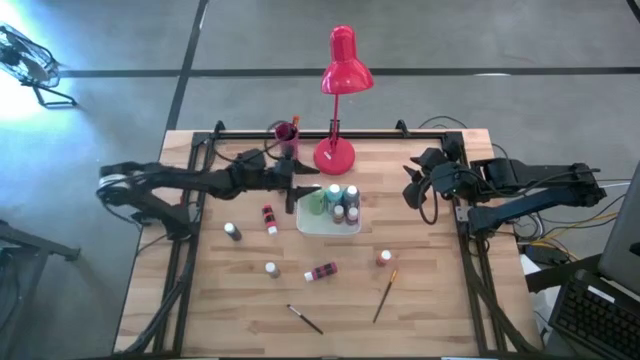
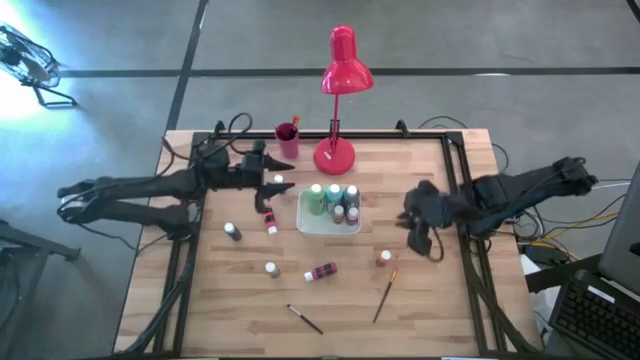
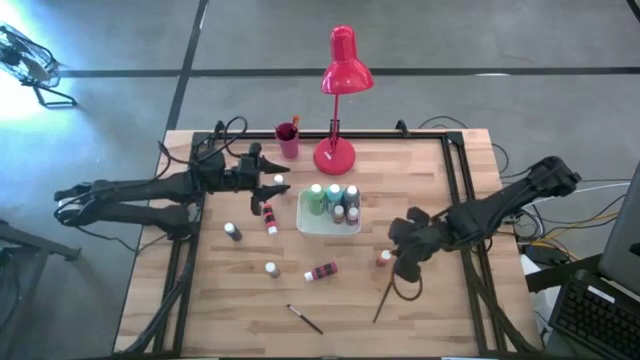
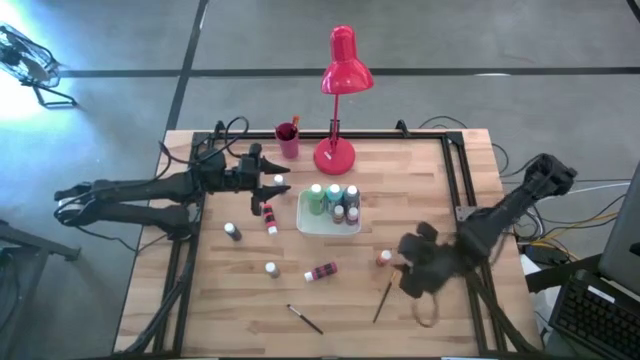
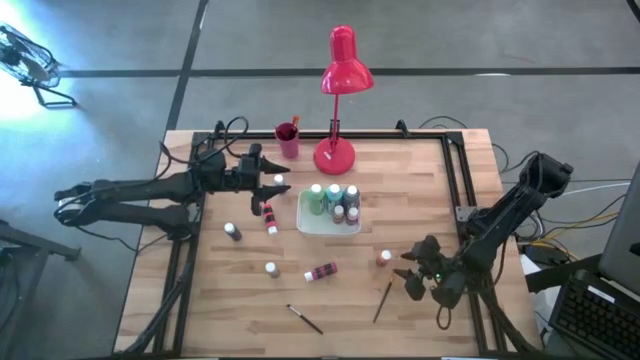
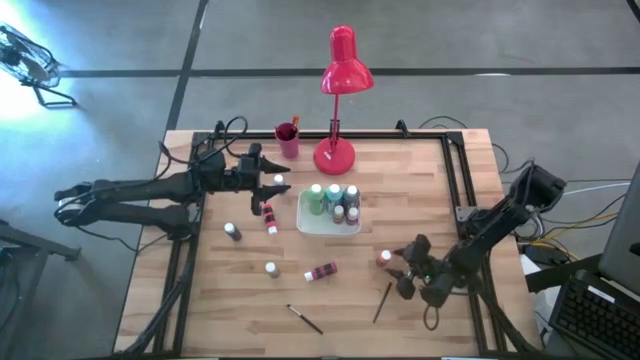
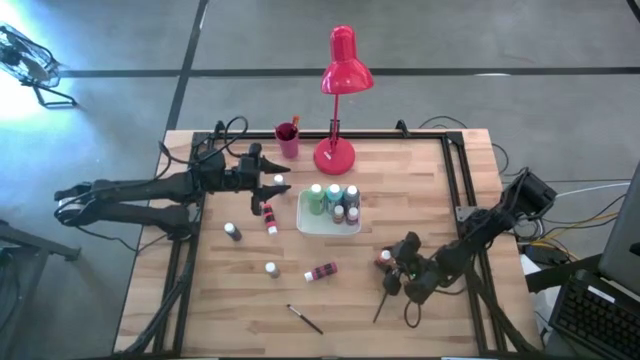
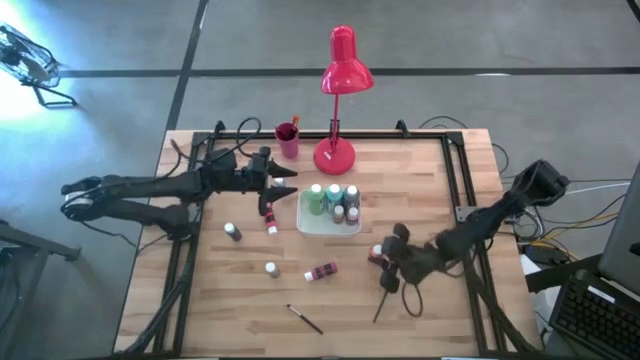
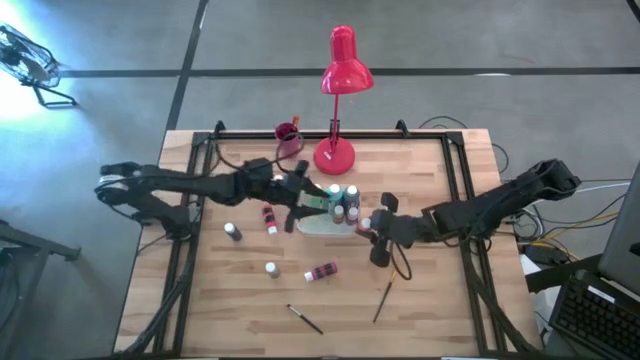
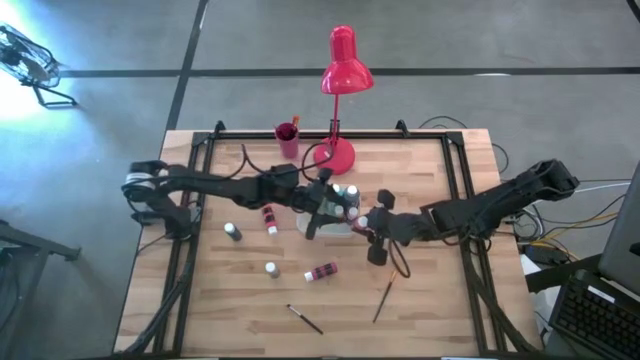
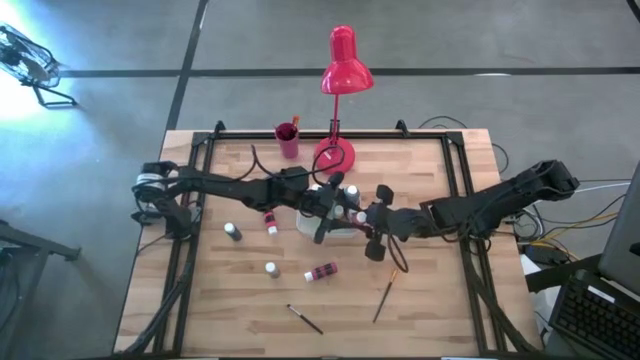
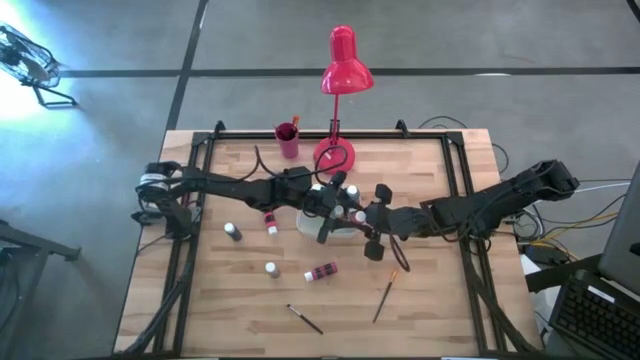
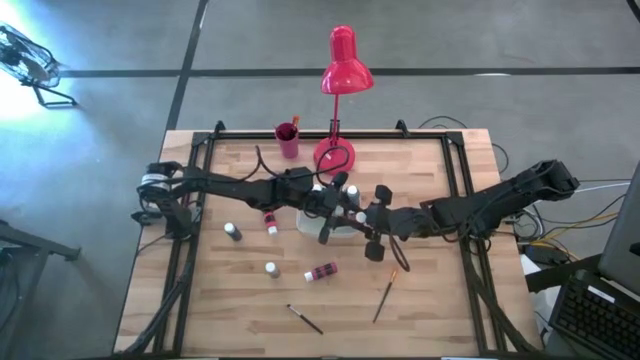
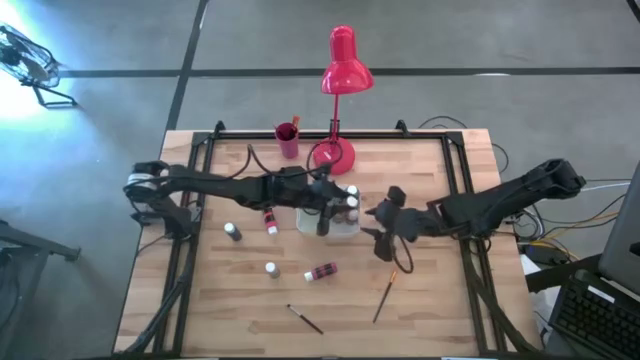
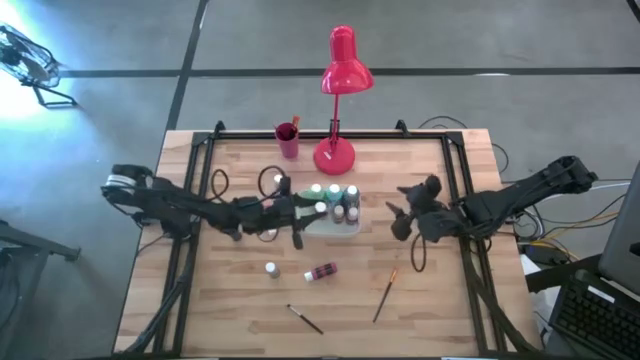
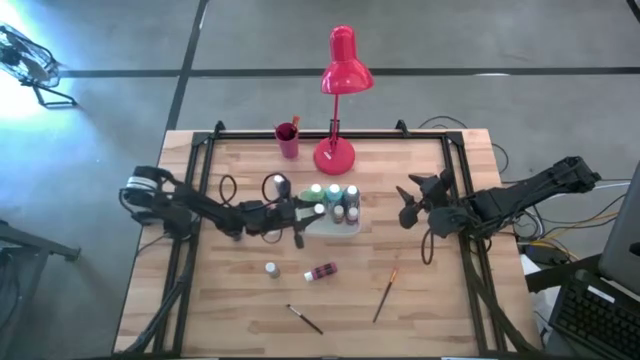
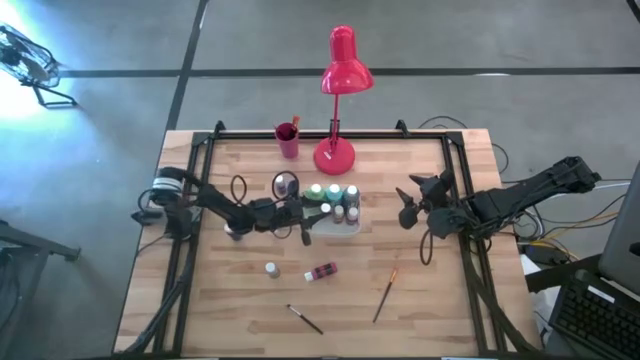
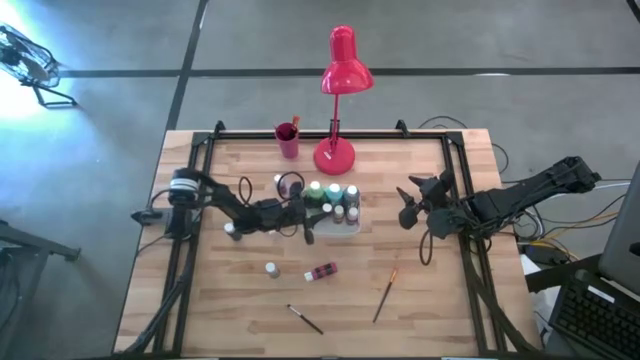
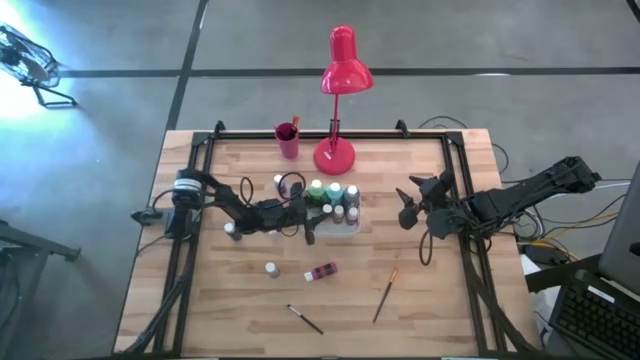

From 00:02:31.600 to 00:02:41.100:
Task: Pick & Place Paint Supplies
Put the orange paint bottle into the white bin

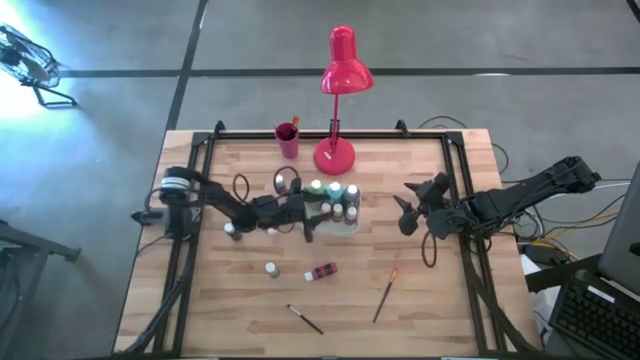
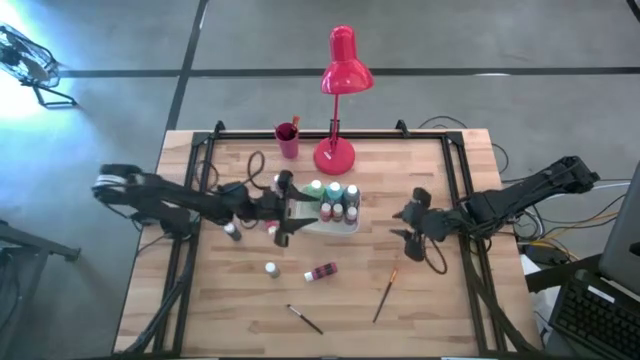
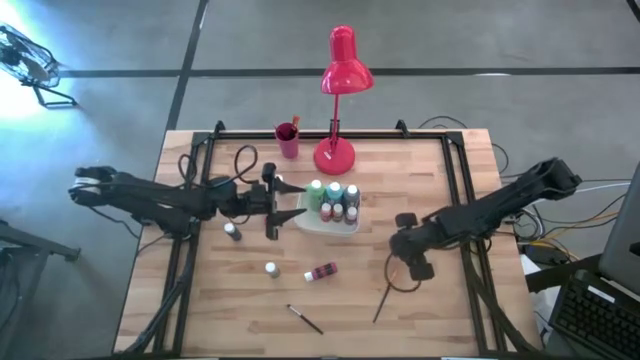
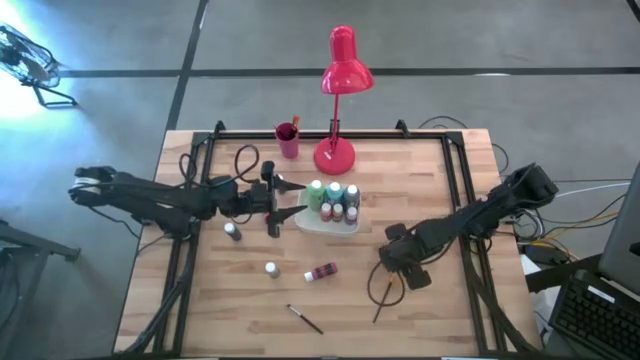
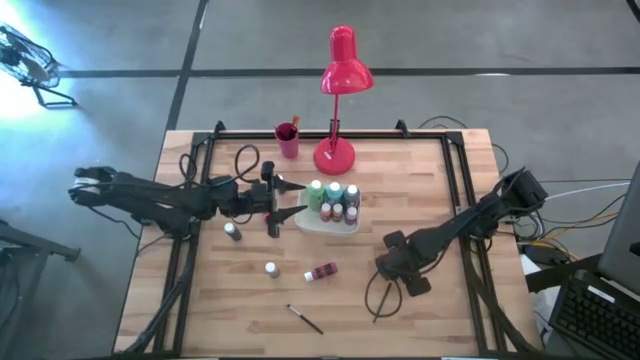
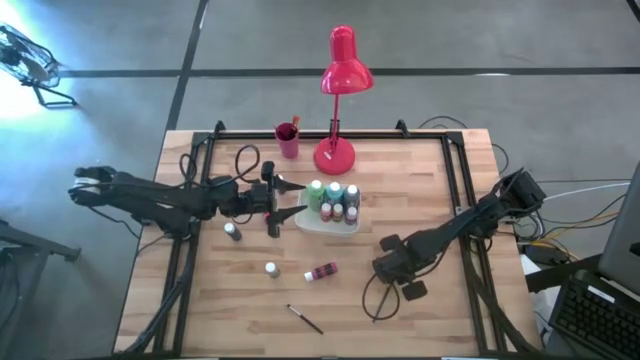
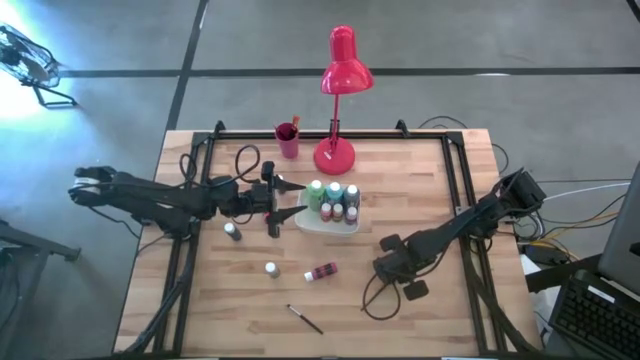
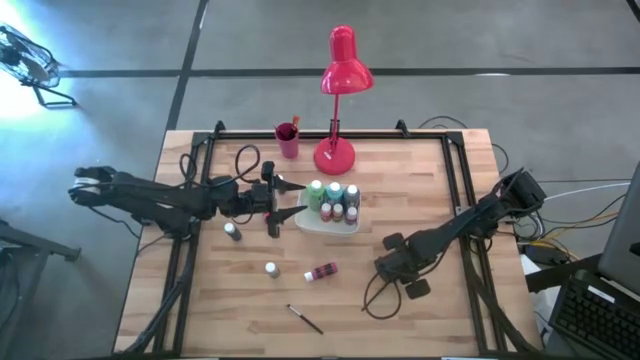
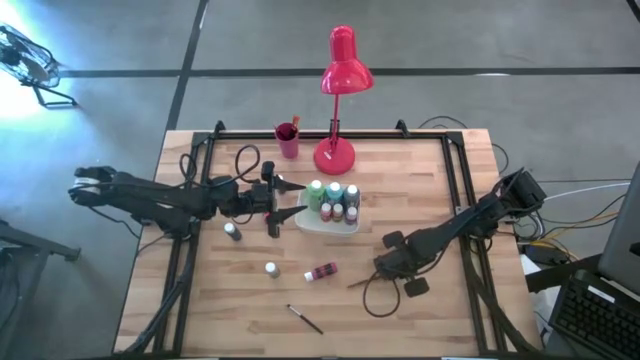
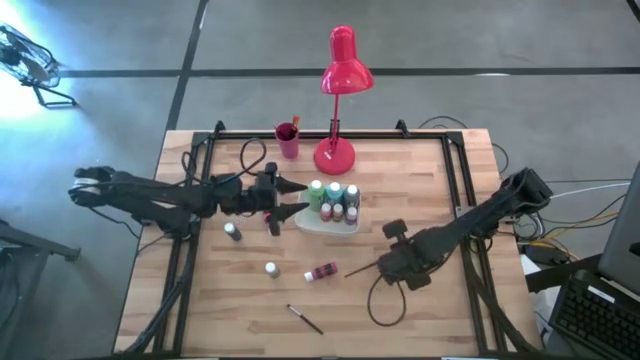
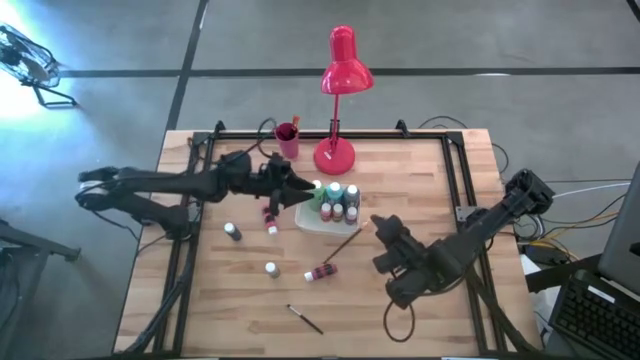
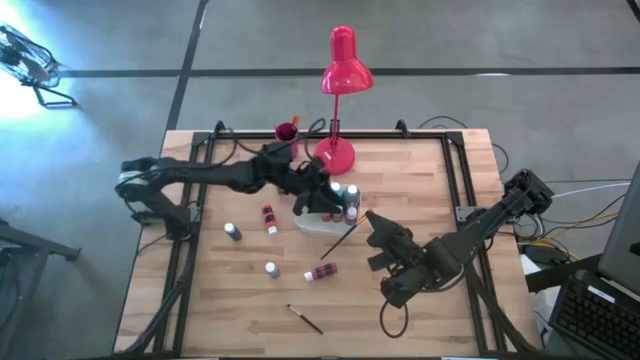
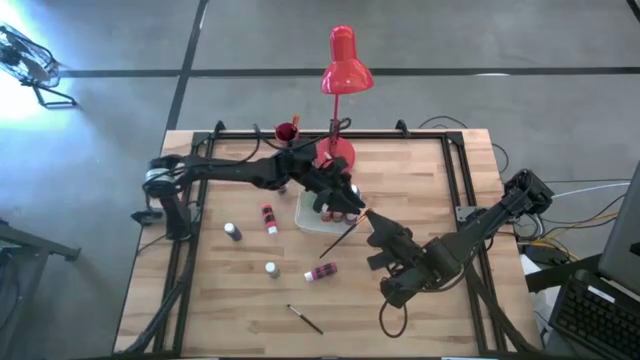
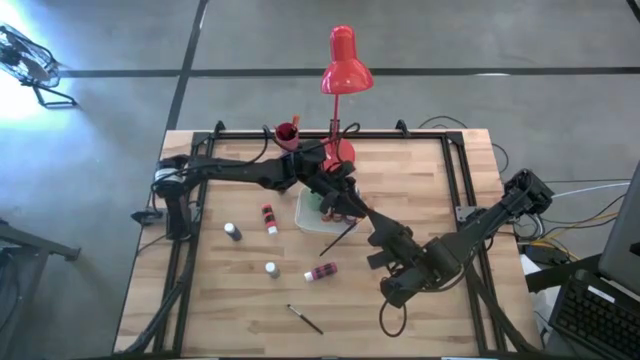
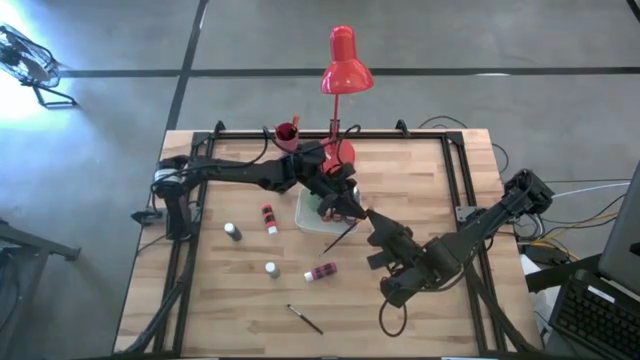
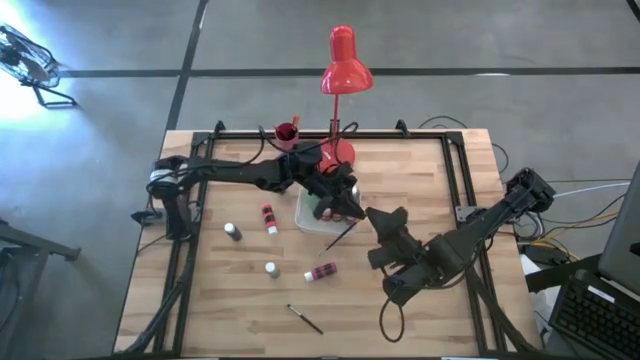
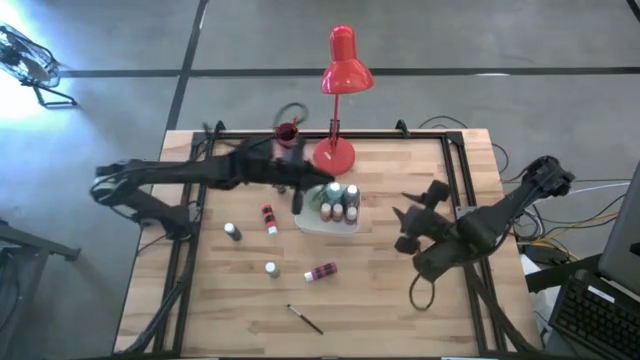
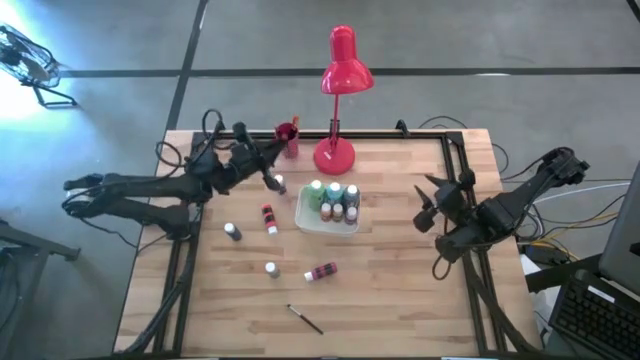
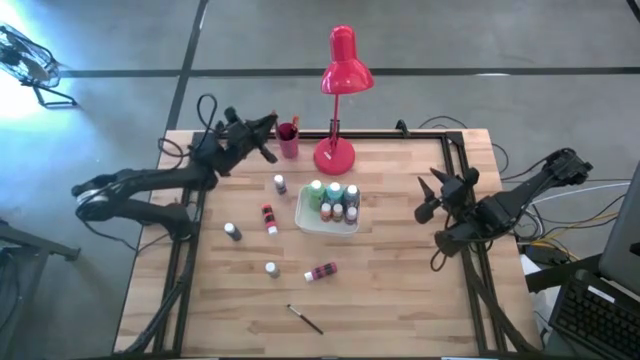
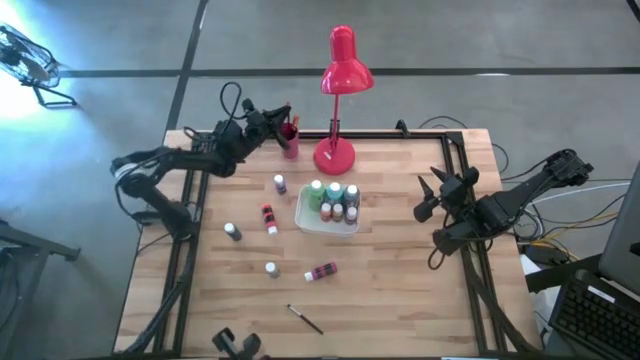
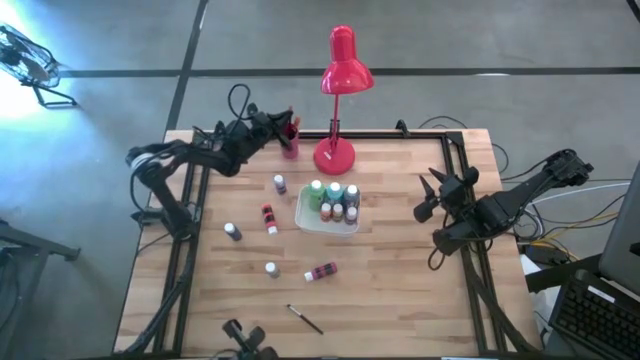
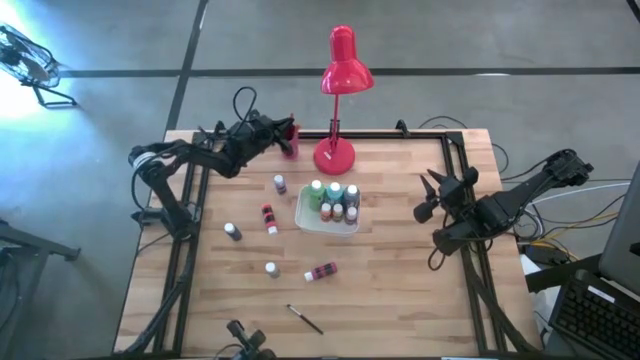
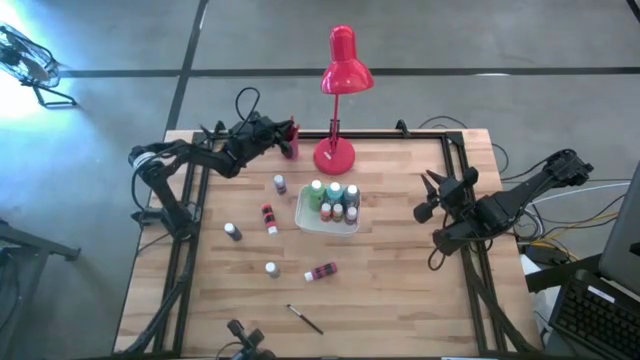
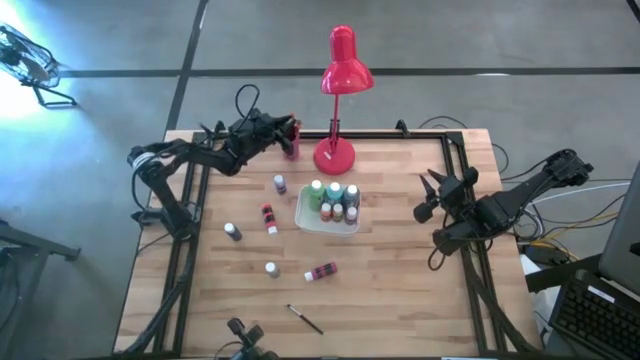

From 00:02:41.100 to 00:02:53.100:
Put the gold paint brush into the red cup
